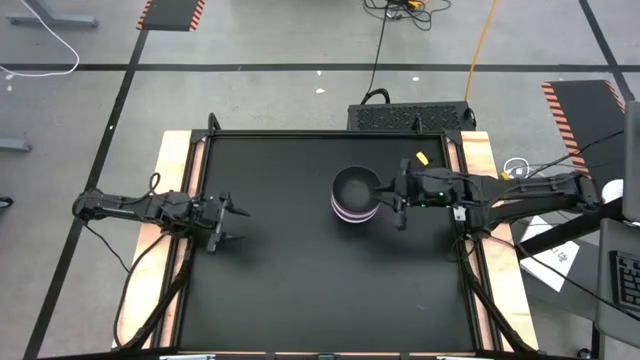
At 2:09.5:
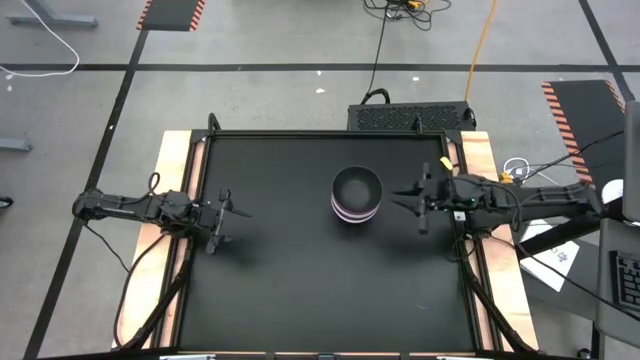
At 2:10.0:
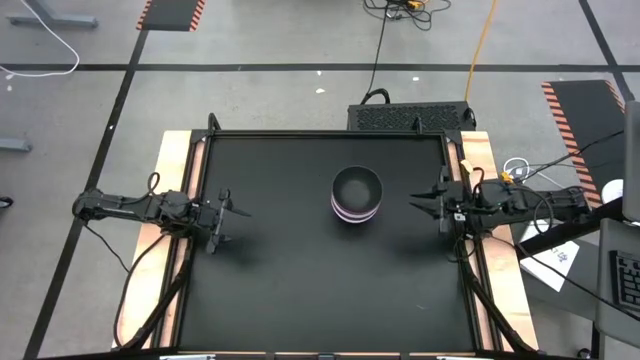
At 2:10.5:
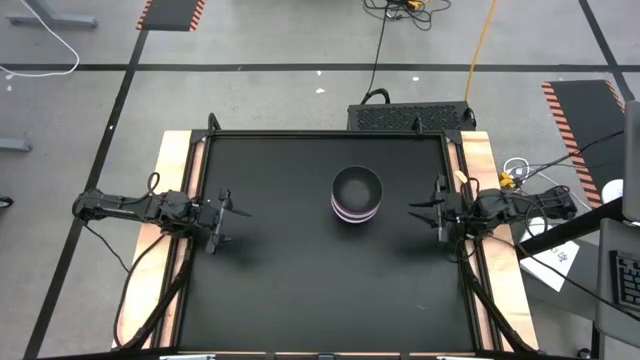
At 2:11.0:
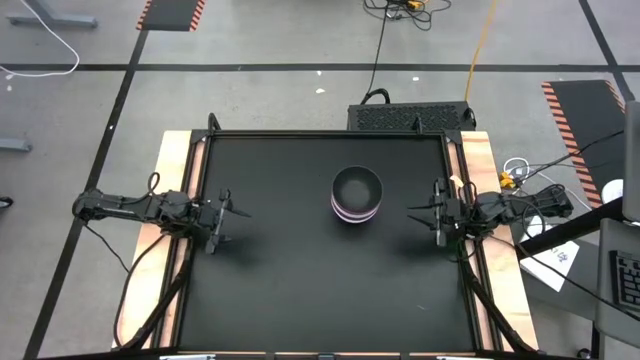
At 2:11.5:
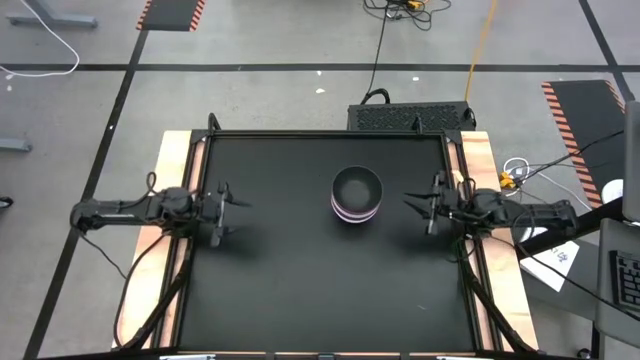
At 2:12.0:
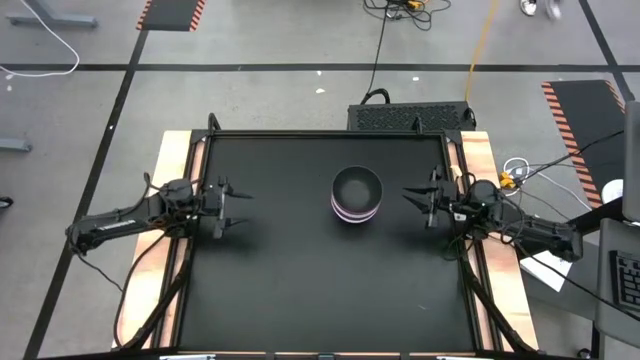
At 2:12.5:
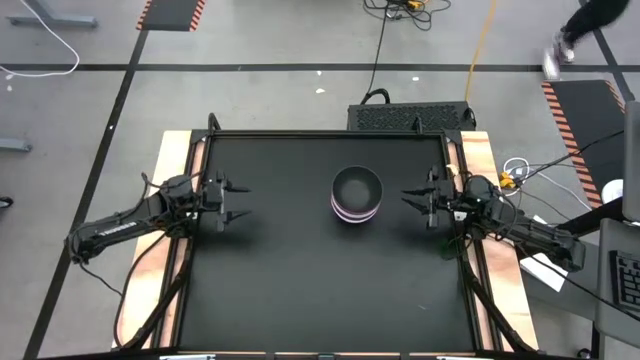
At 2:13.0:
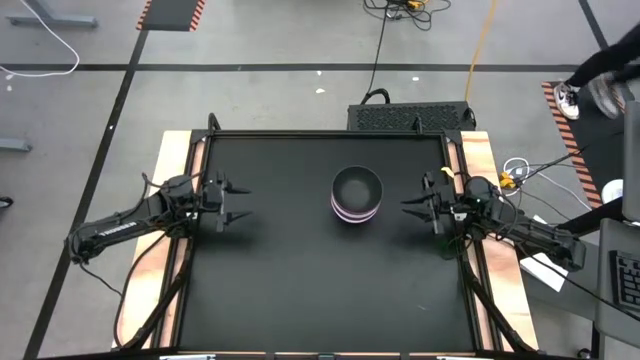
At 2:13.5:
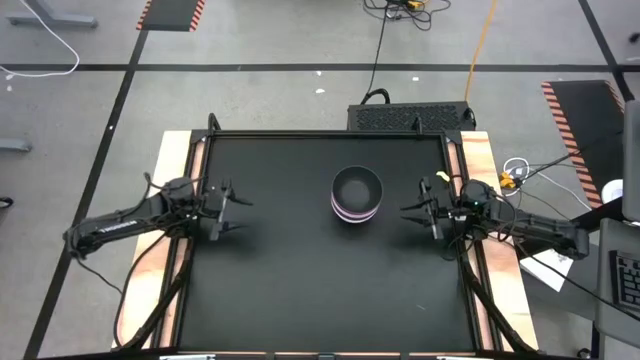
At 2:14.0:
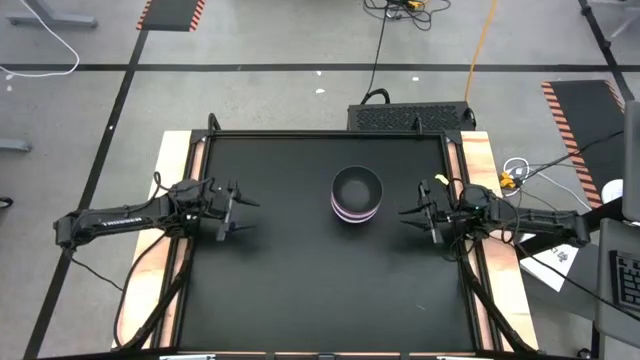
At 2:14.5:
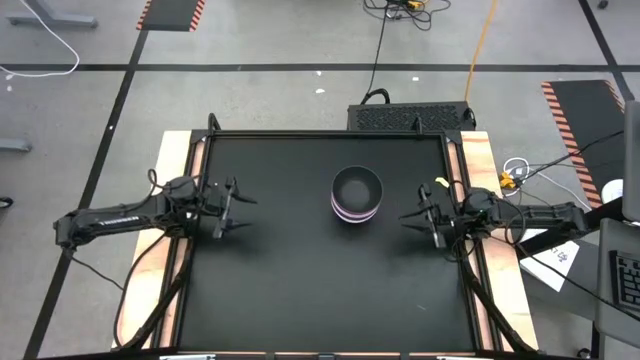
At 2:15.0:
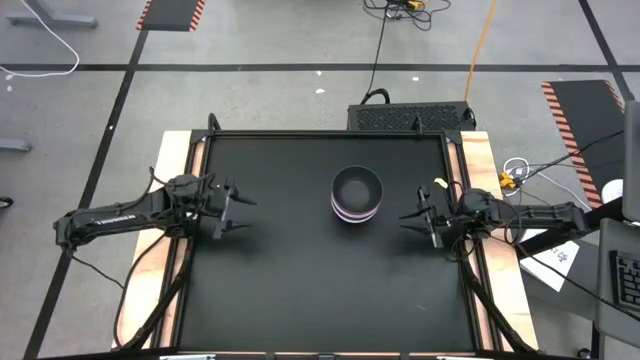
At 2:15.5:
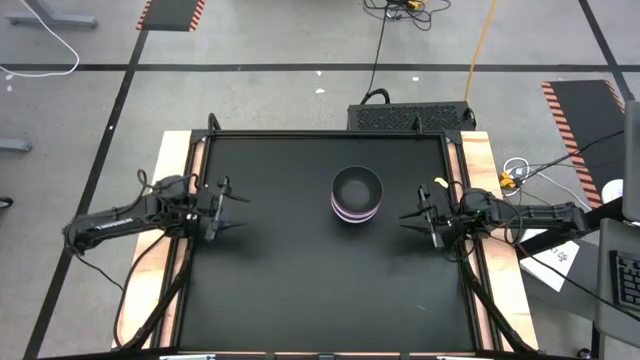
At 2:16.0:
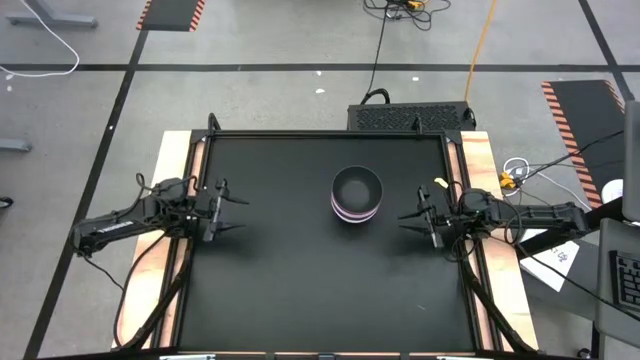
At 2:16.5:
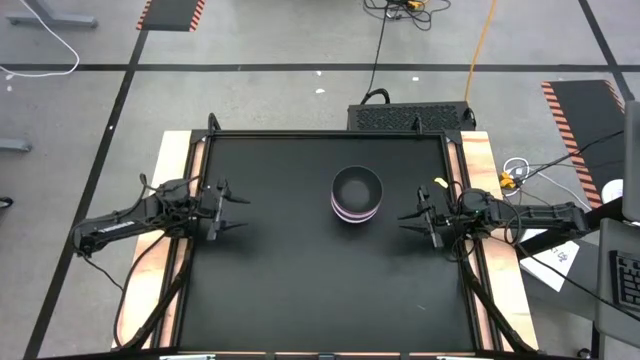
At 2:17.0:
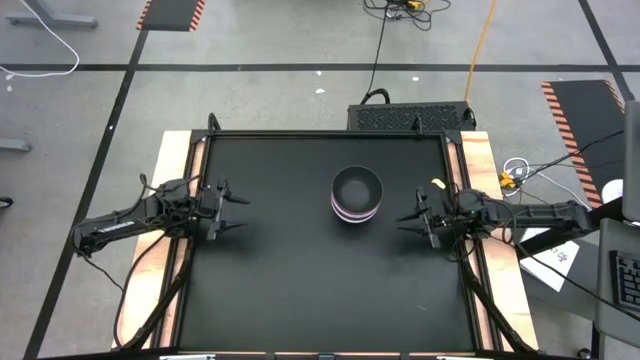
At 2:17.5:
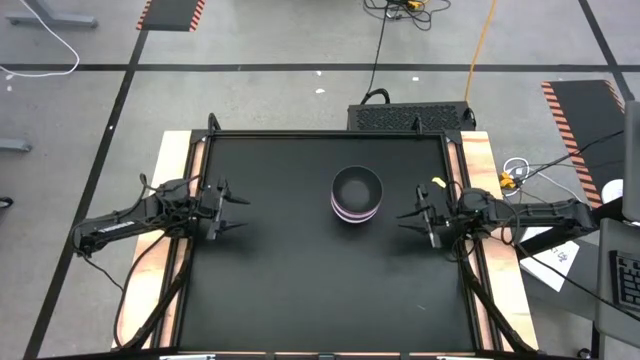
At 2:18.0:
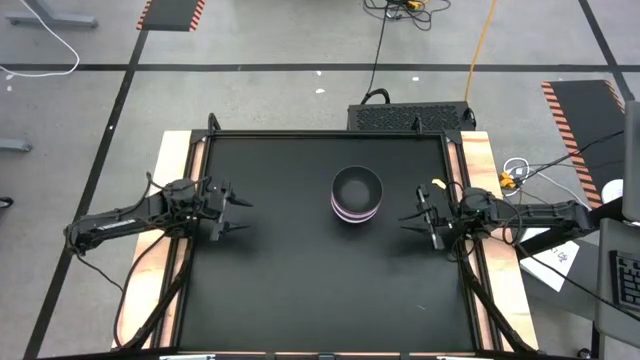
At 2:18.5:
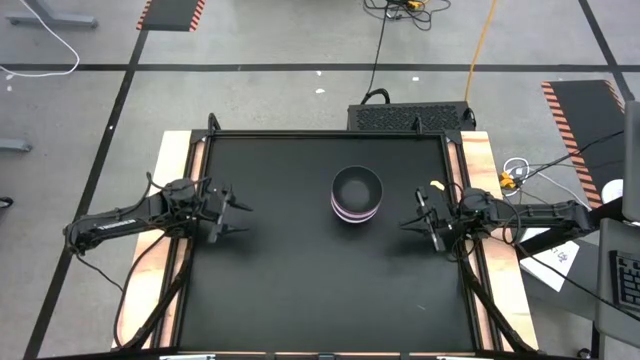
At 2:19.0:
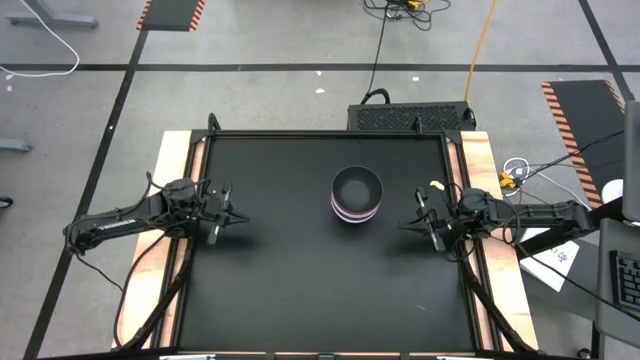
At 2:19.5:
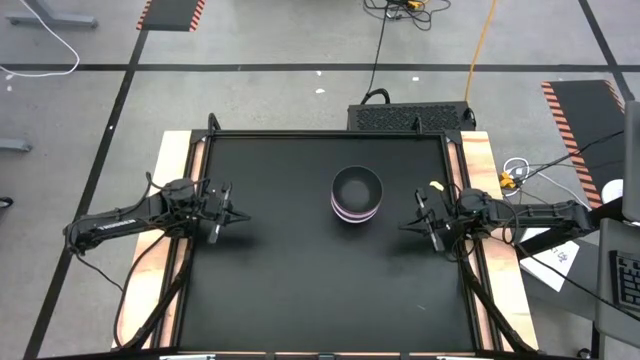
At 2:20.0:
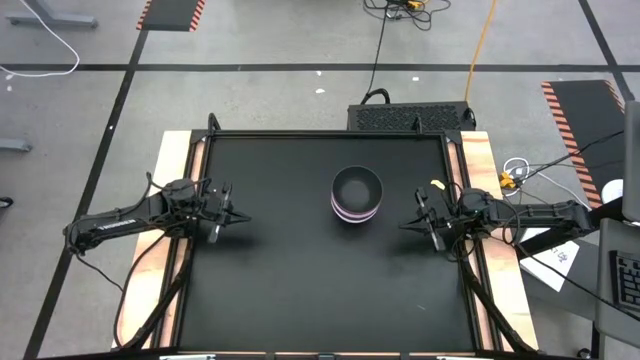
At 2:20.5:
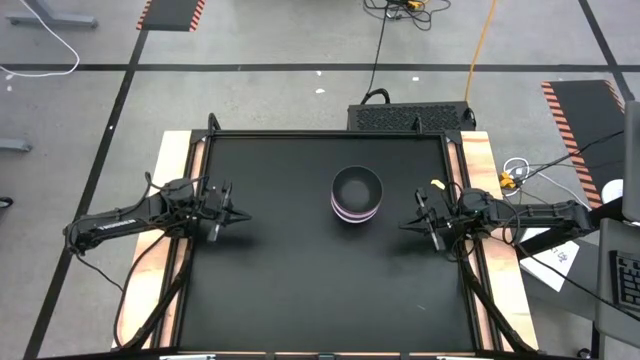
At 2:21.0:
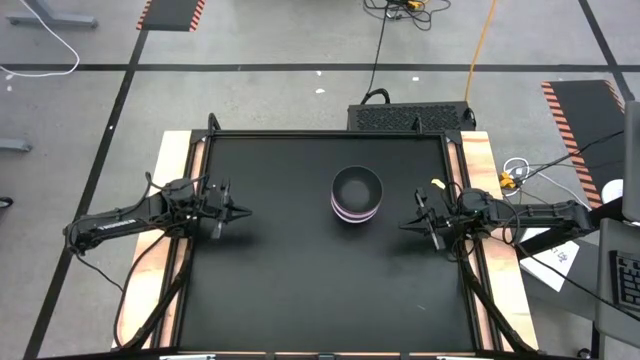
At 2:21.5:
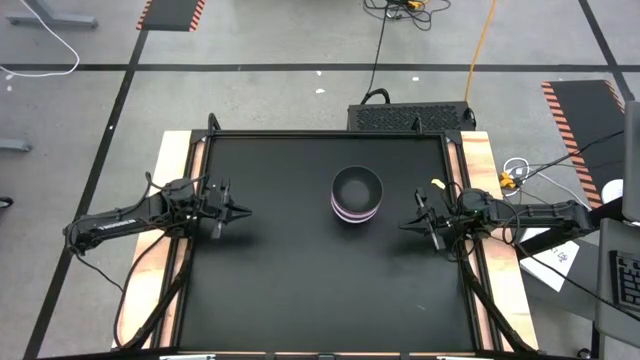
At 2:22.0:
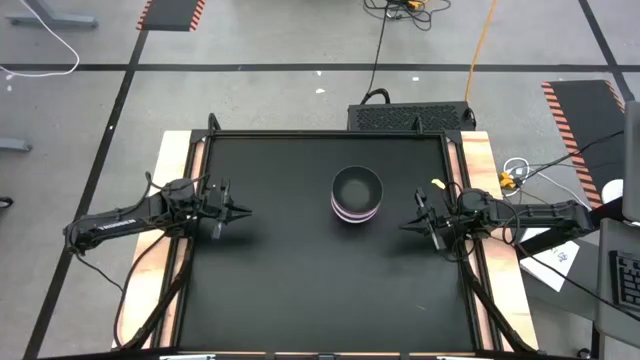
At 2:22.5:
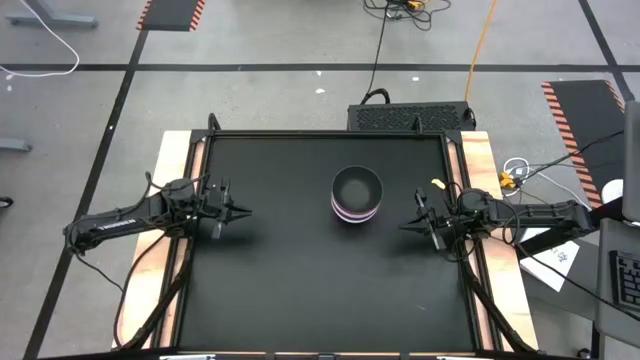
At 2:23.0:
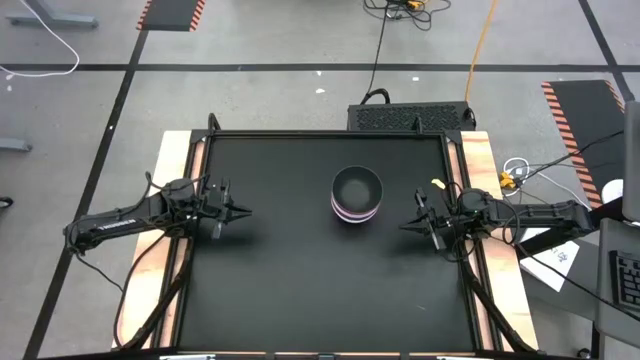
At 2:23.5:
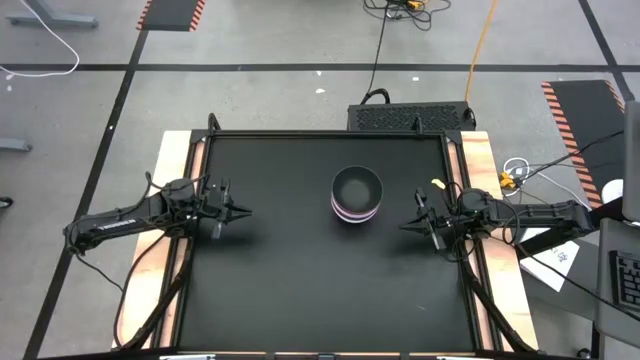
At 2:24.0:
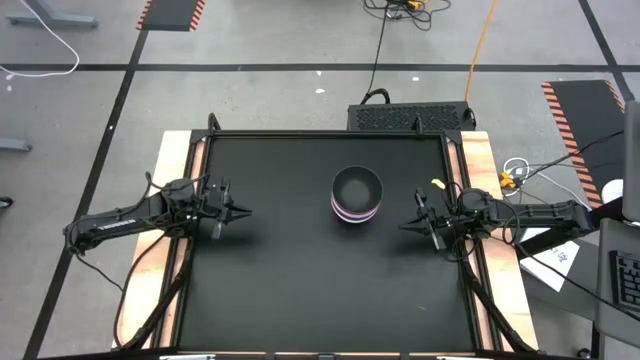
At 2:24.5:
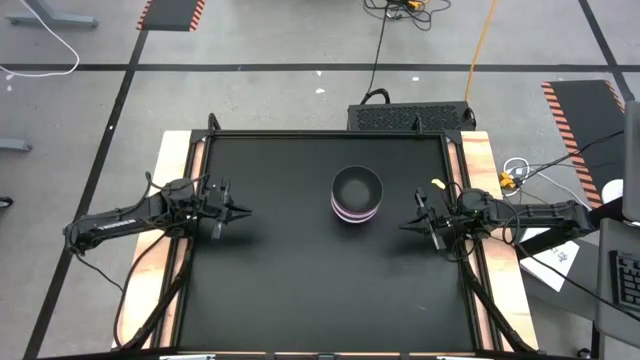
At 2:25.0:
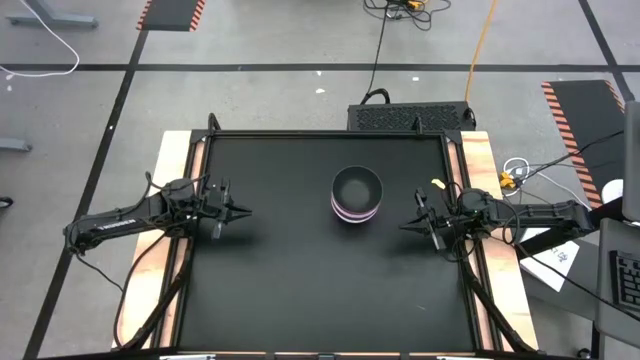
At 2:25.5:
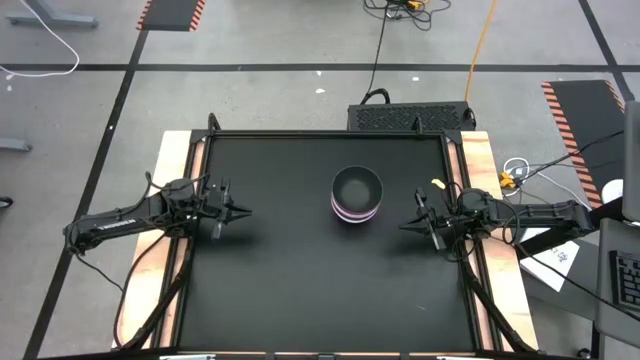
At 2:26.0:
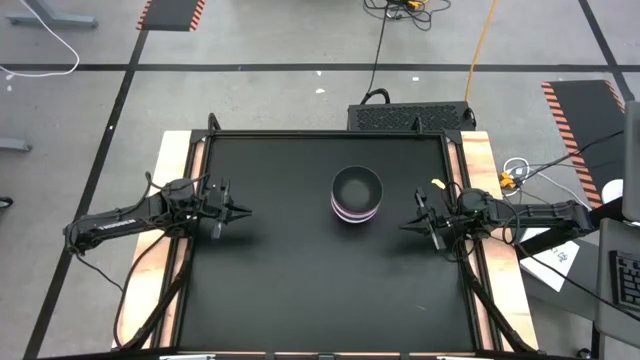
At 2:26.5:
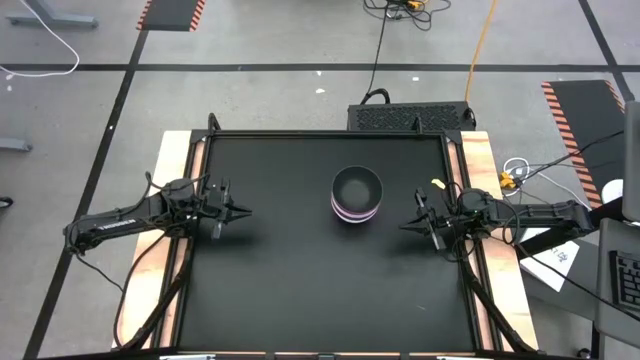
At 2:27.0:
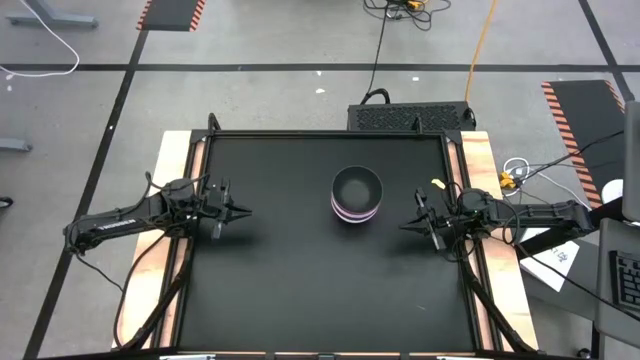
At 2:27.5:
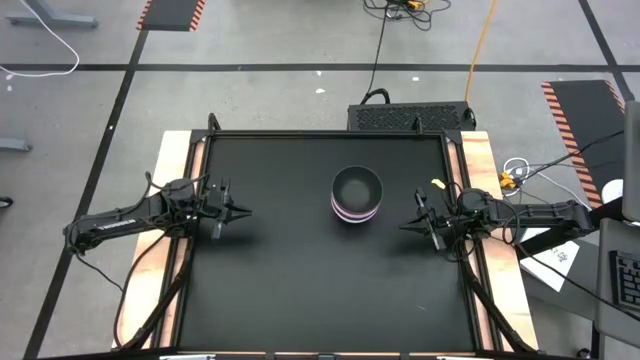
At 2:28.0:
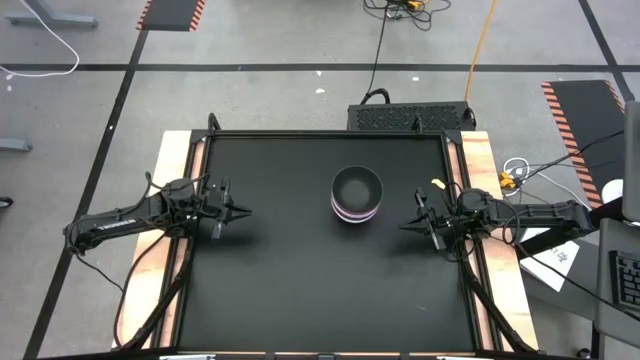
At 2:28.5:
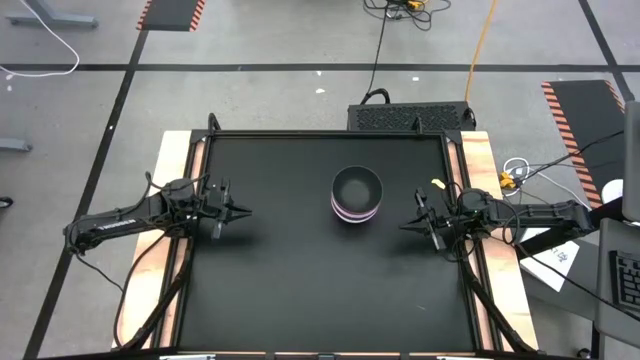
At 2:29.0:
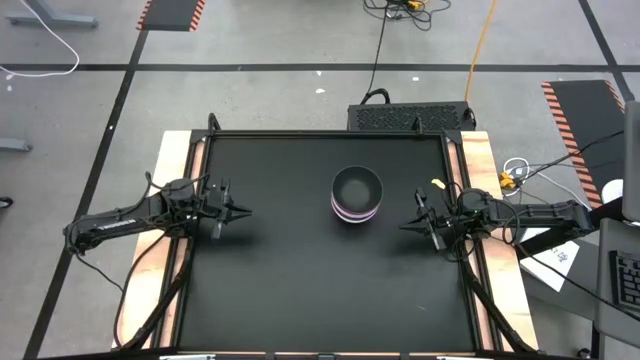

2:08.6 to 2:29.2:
Task: Nest bowls inside each other
Return to Home Position
